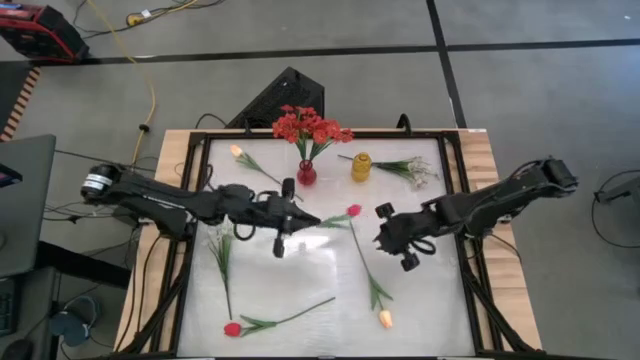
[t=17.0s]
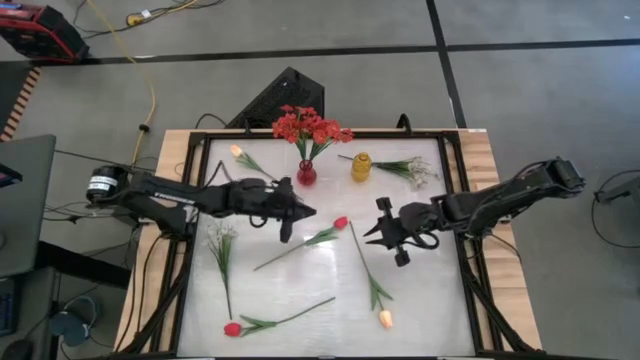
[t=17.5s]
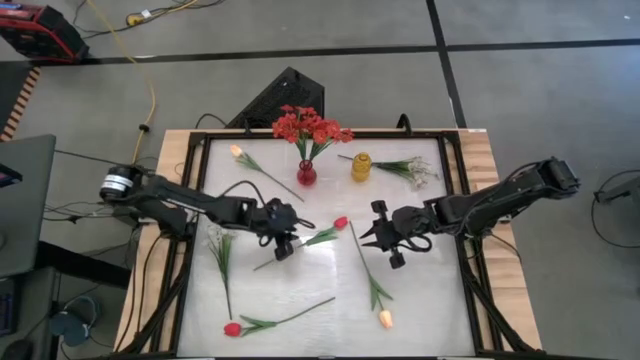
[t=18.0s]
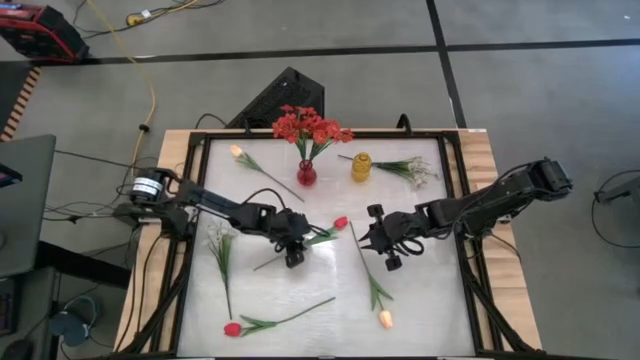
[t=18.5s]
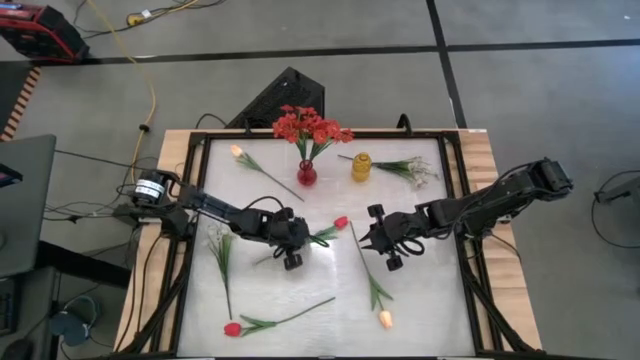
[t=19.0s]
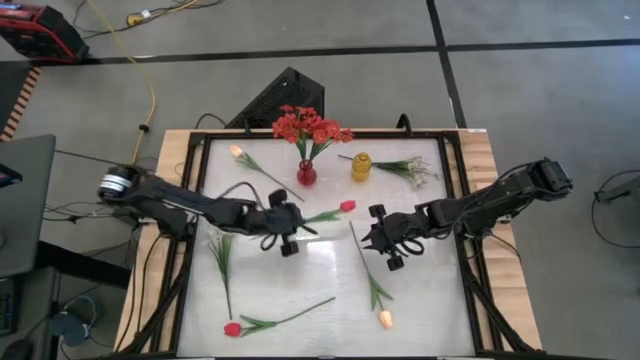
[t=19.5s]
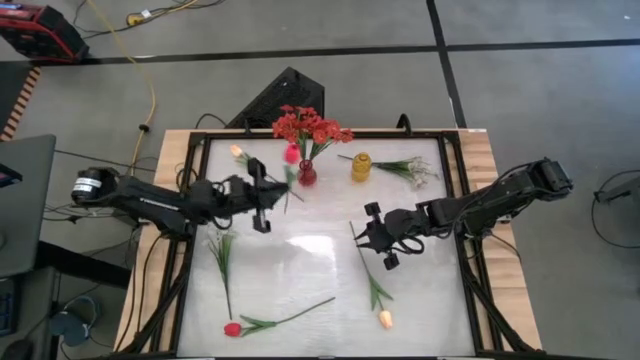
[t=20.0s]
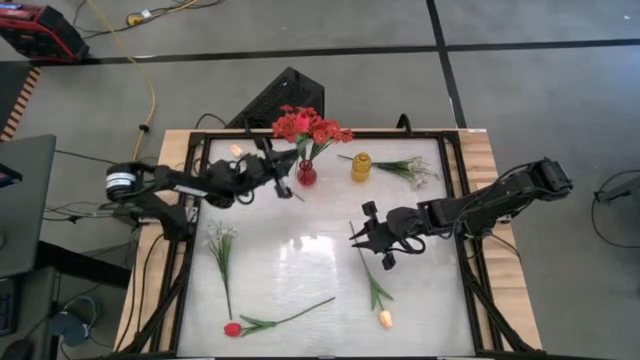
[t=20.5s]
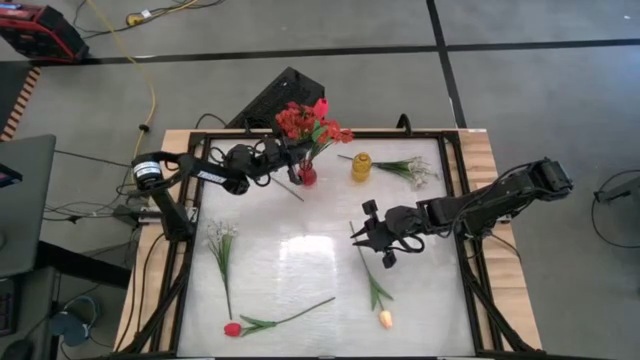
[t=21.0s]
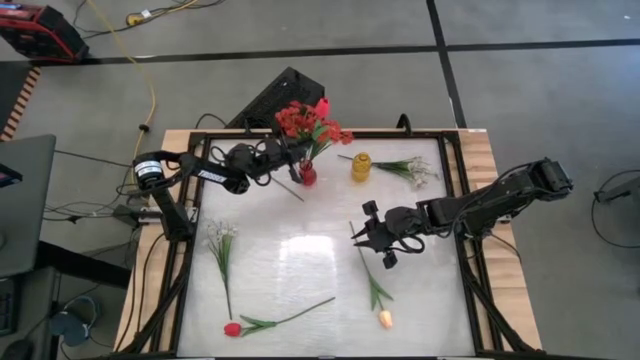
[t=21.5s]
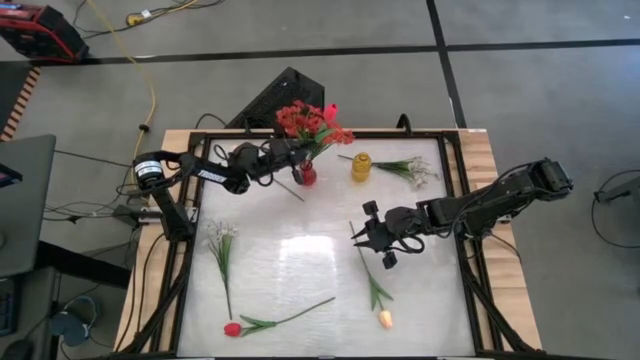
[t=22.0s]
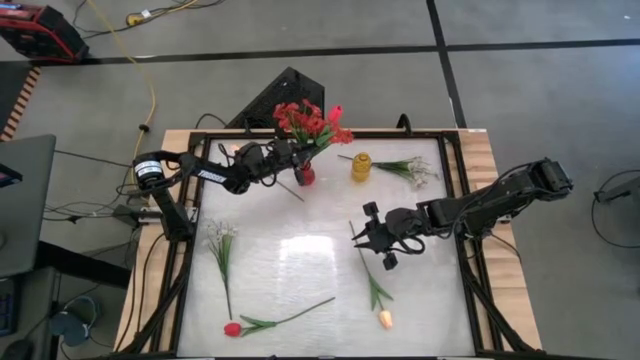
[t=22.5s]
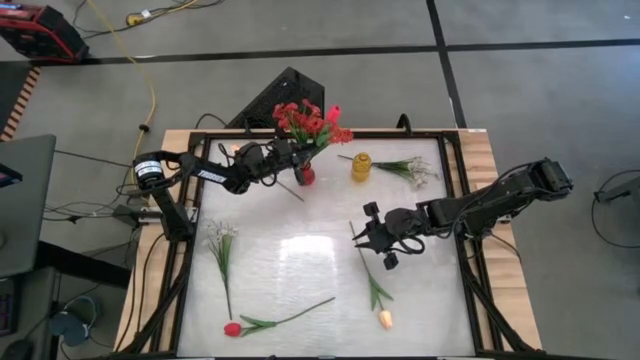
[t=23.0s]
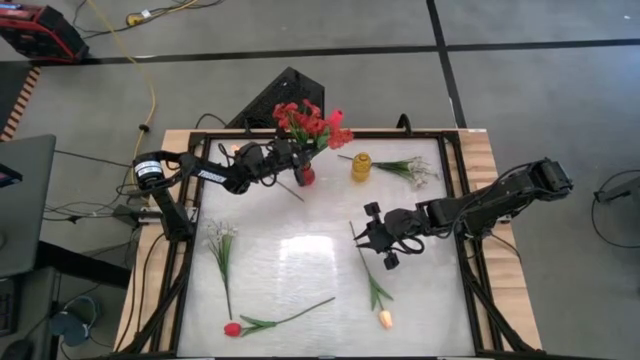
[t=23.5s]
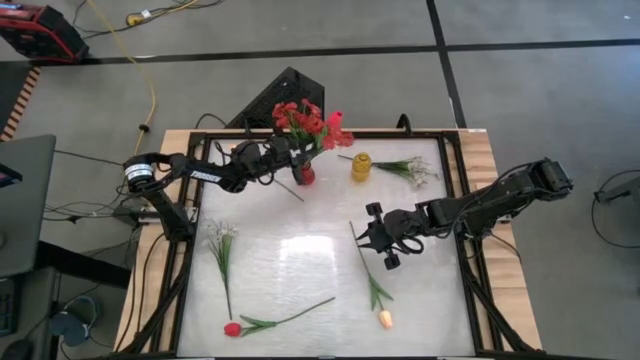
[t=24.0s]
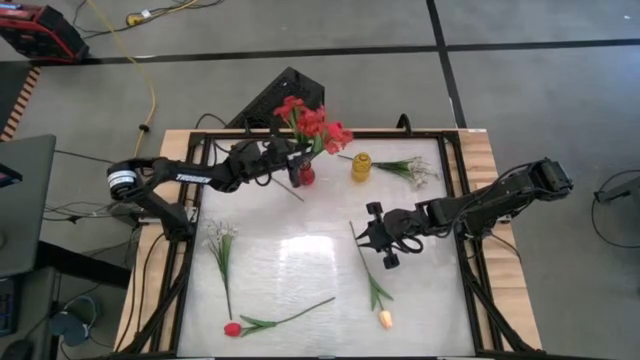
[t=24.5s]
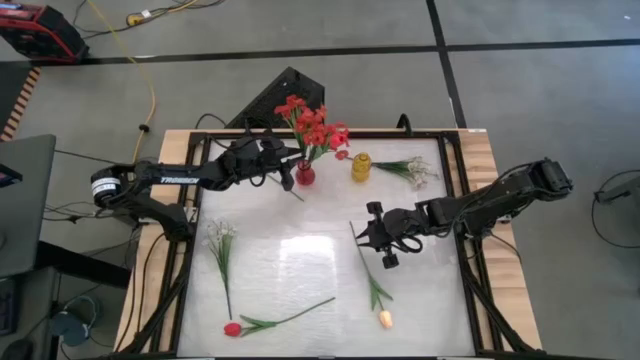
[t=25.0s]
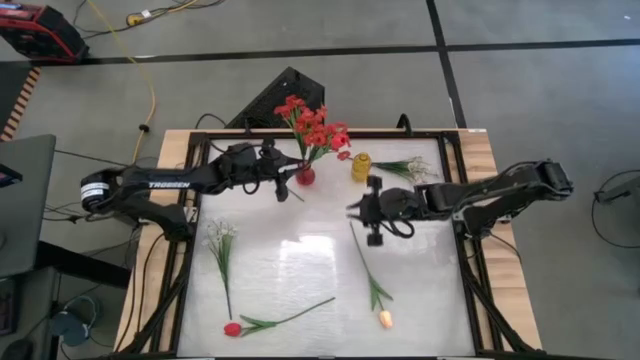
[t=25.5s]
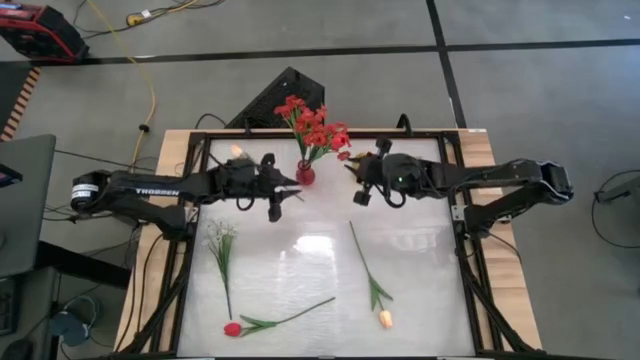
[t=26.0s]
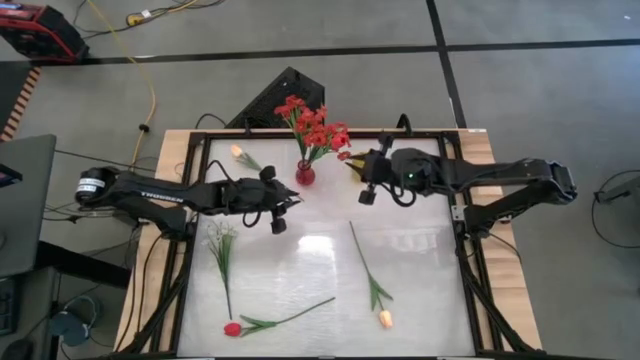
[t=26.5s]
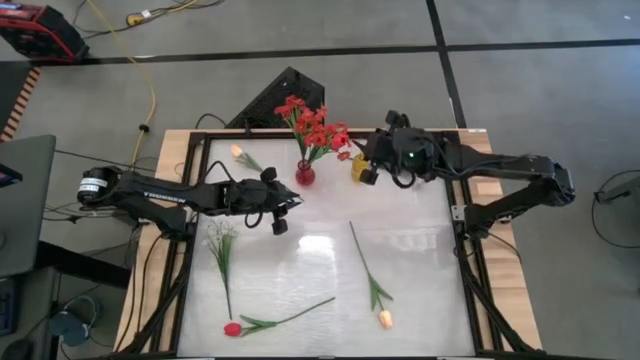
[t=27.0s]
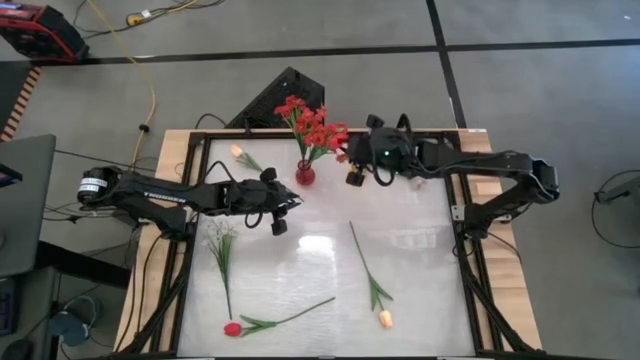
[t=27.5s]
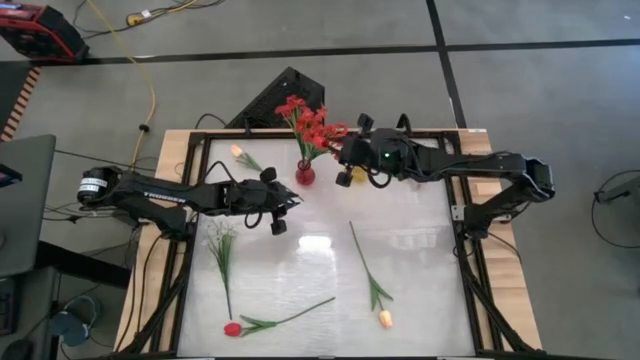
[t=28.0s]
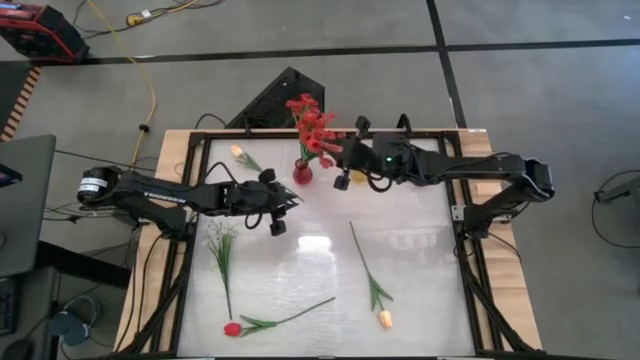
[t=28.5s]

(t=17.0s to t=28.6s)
Task: Sort flowers into vase by color
Put the top red tulip into the red vase

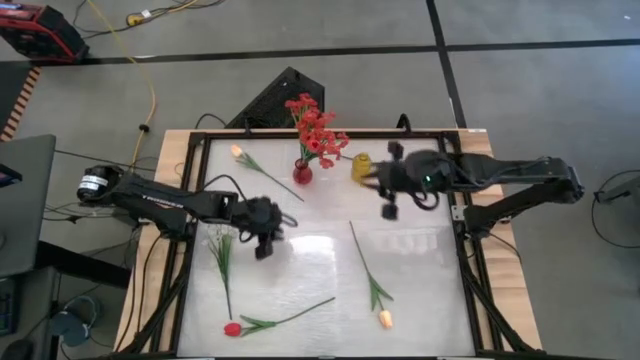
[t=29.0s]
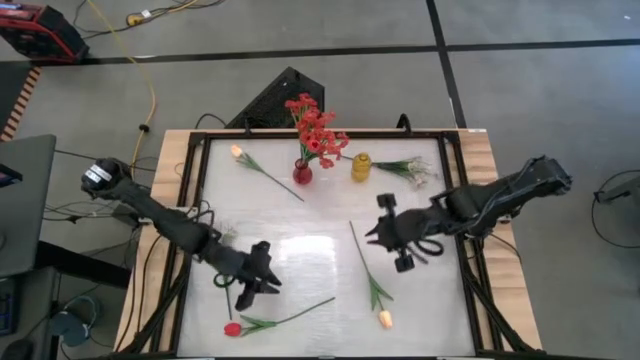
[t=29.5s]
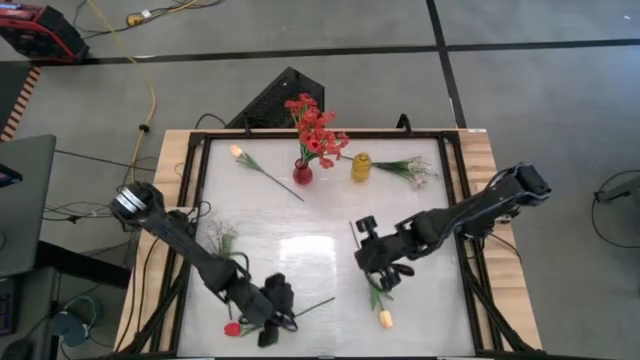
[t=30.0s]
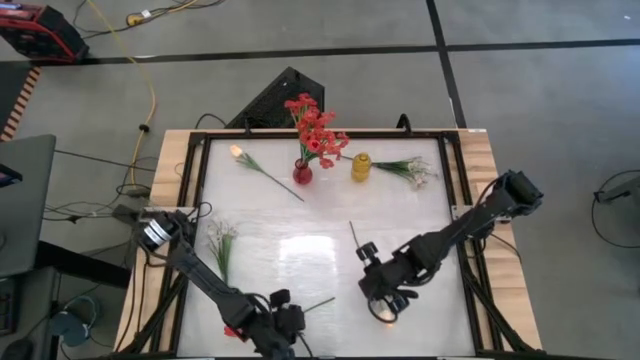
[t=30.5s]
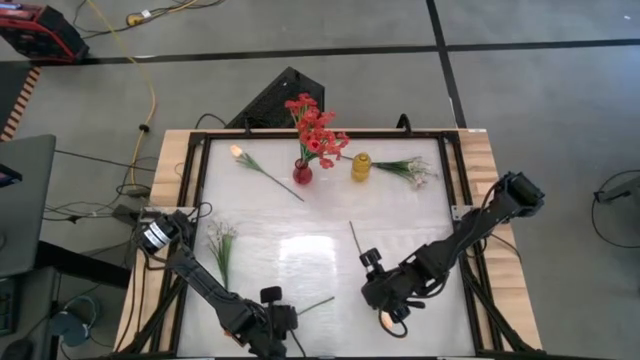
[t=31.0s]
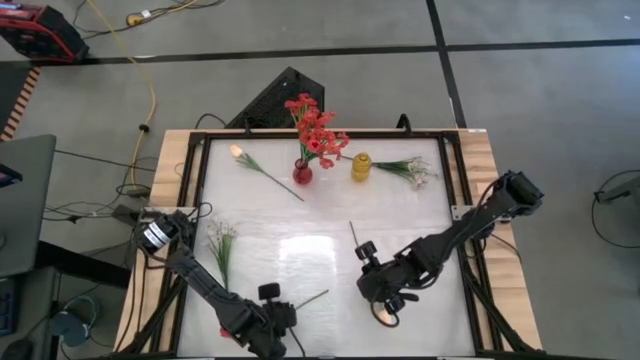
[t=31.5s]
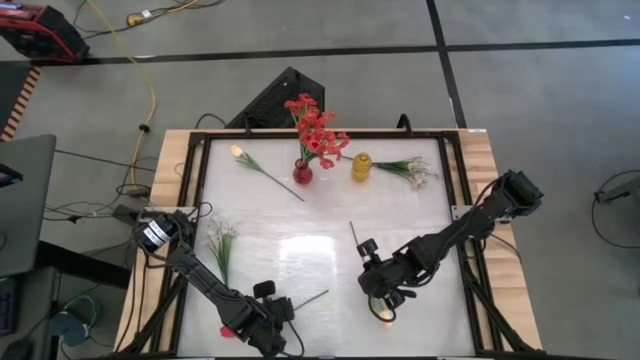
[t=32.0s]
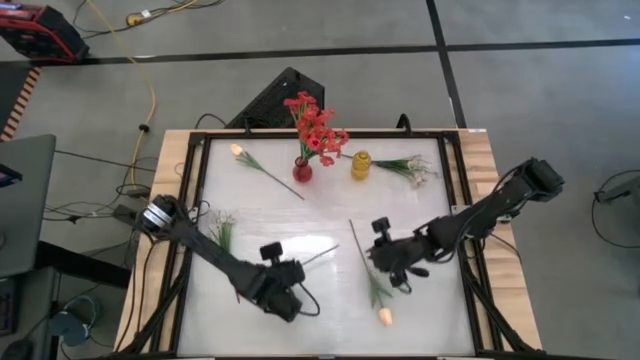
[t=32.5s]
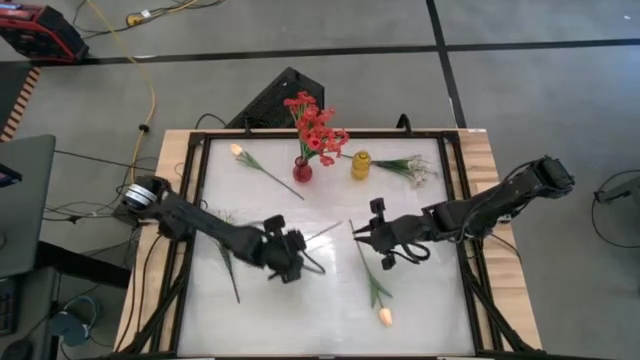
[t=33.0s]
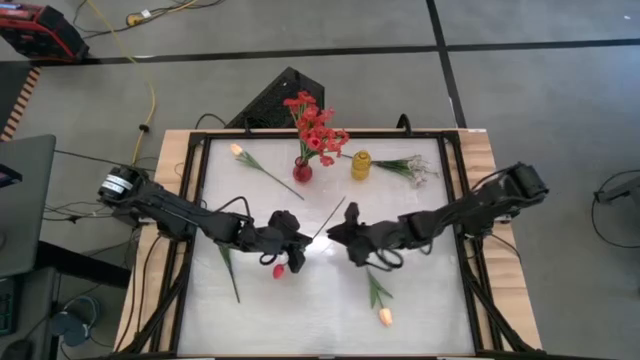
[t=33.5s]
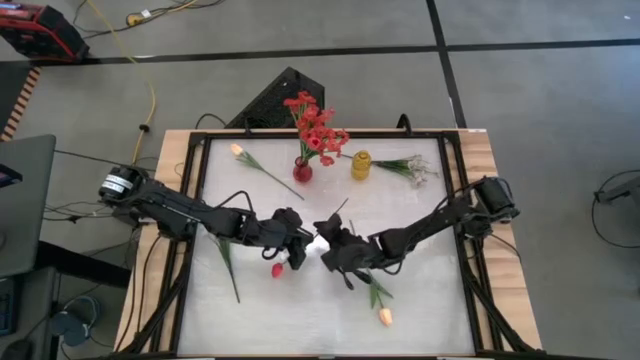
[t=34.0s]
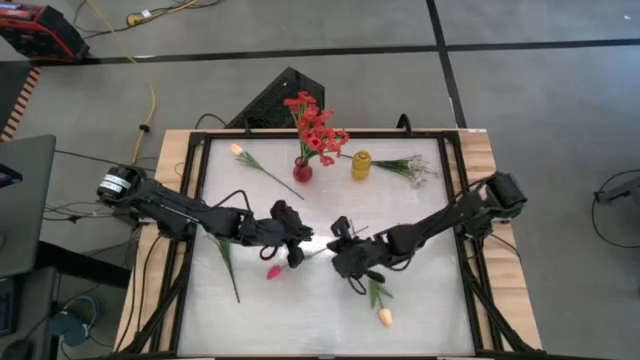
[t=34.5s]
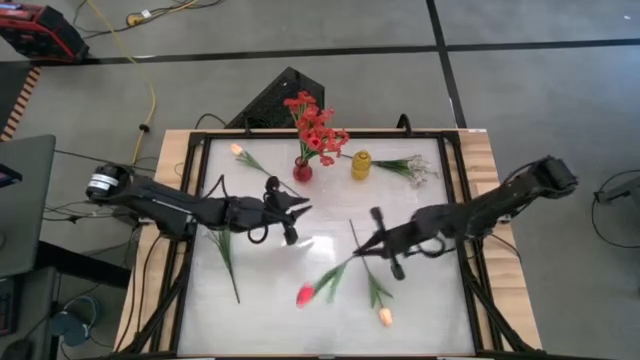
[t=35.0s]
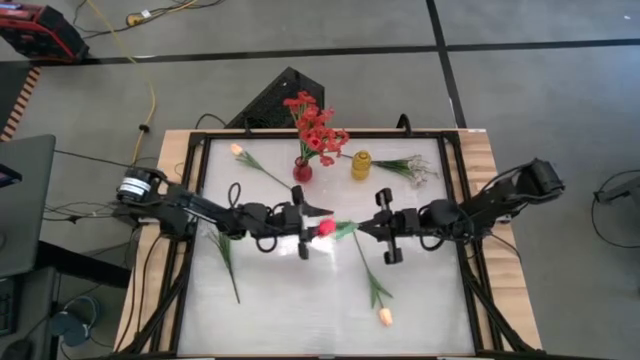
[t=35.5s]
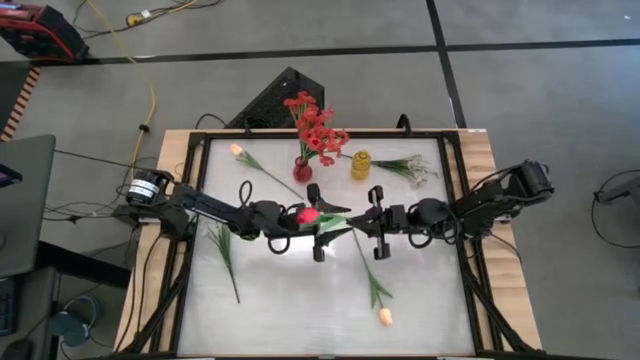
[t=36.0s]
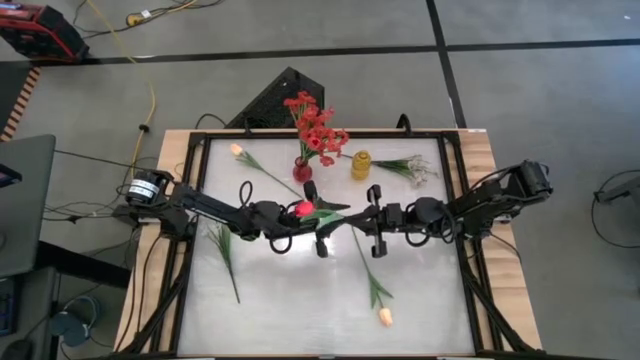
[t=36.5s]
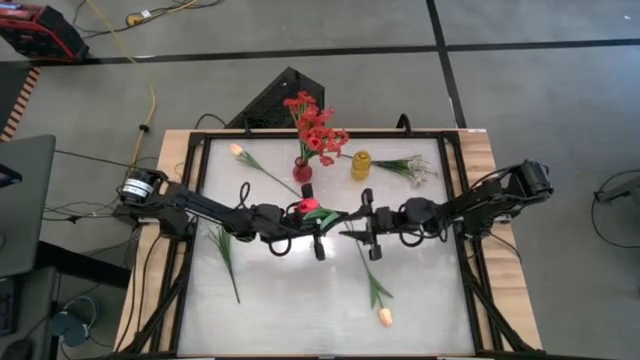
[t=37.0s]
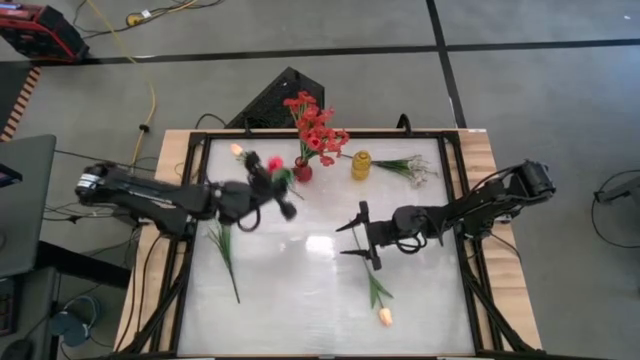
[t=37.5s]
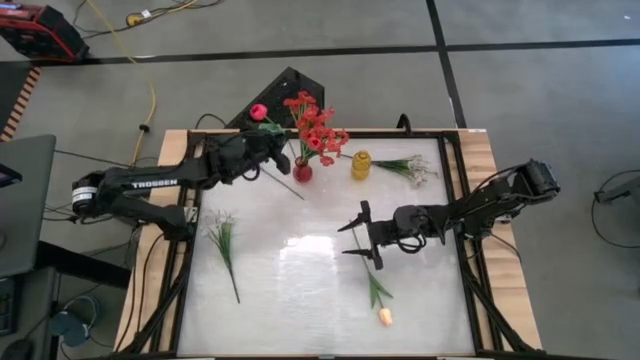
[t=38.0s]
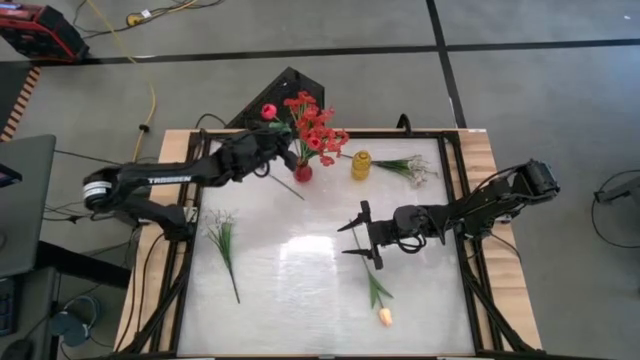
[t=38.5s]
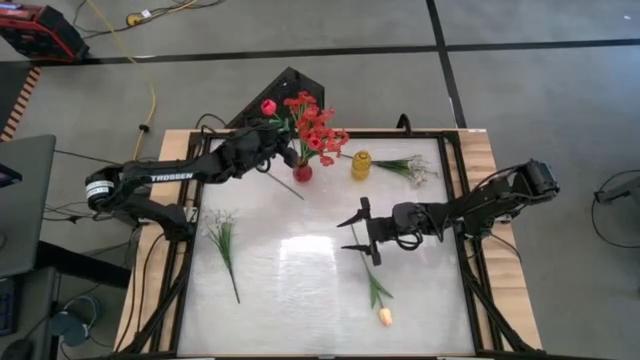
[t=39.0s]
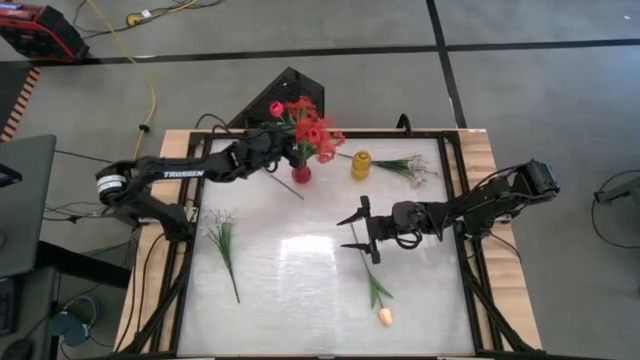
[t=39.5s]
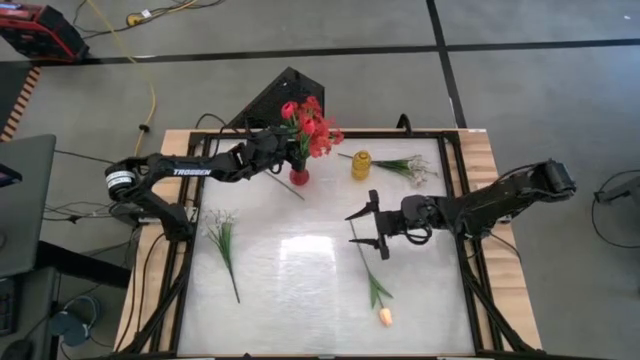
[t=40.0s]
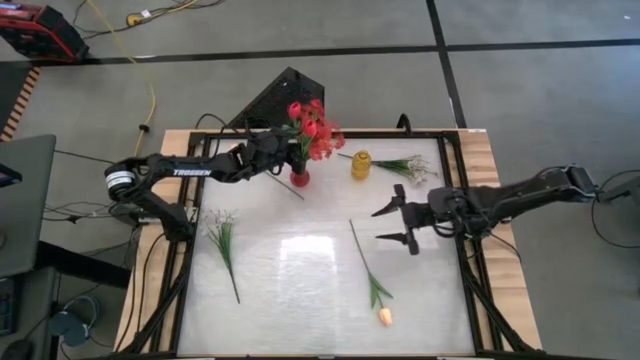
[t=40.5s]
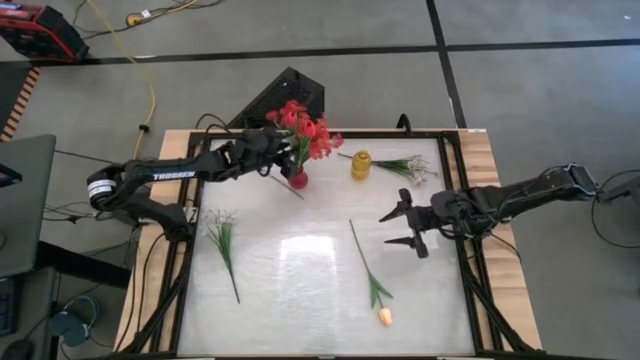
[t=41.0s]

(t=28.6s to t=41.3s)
Put the red tulip into the red vase
